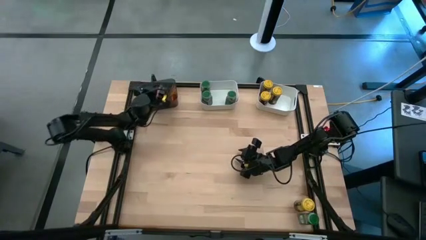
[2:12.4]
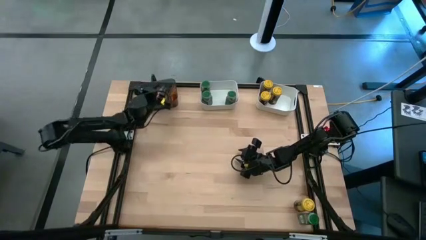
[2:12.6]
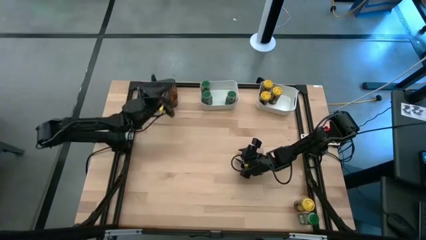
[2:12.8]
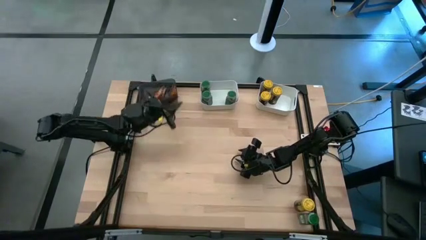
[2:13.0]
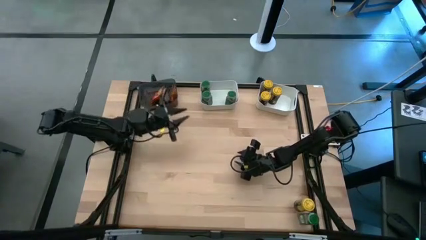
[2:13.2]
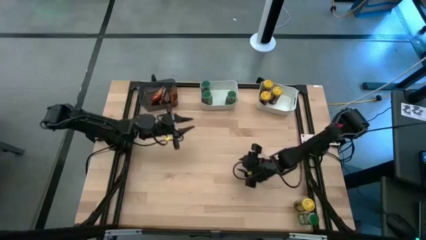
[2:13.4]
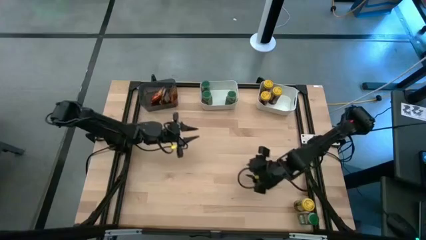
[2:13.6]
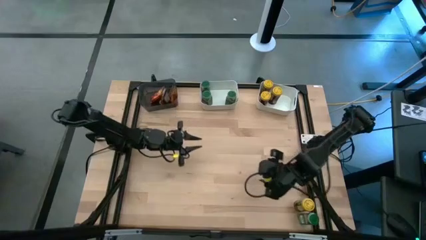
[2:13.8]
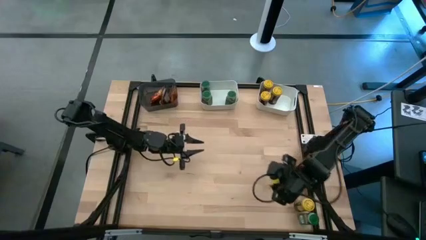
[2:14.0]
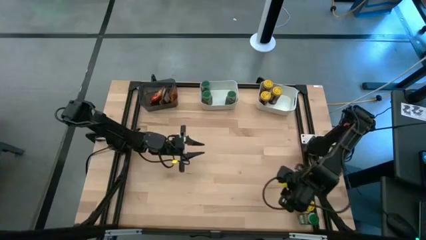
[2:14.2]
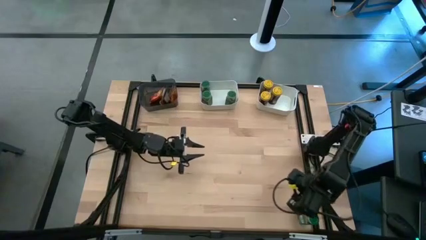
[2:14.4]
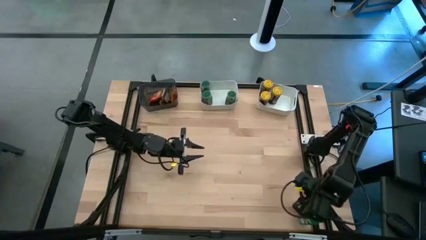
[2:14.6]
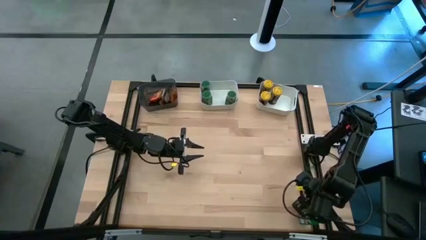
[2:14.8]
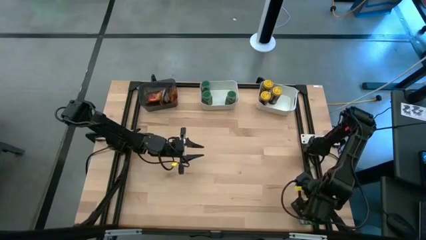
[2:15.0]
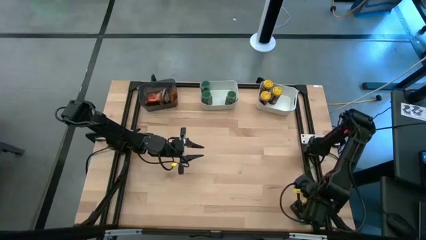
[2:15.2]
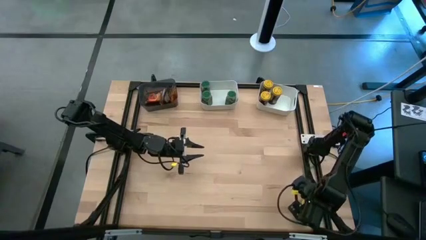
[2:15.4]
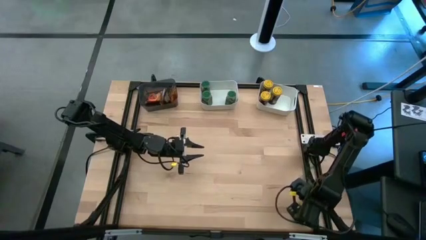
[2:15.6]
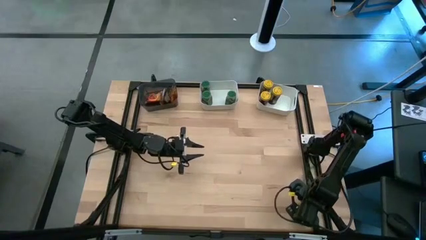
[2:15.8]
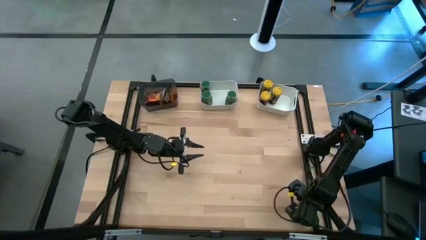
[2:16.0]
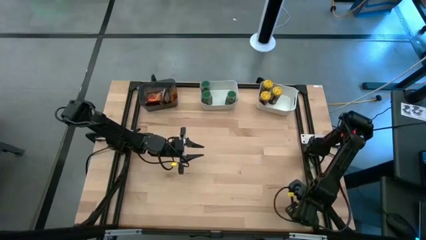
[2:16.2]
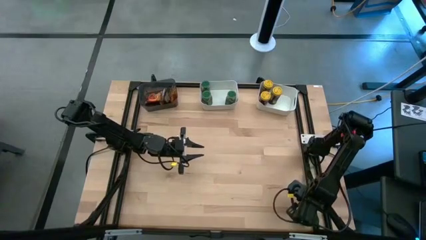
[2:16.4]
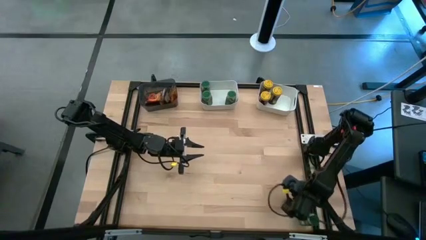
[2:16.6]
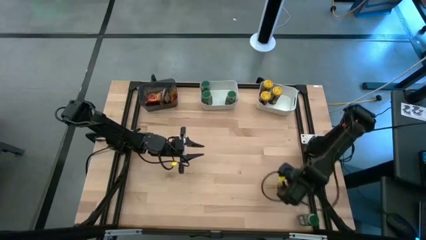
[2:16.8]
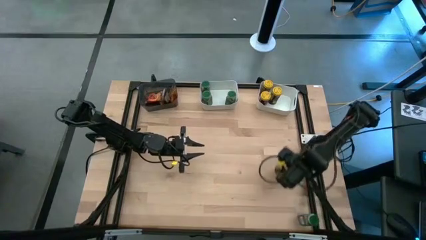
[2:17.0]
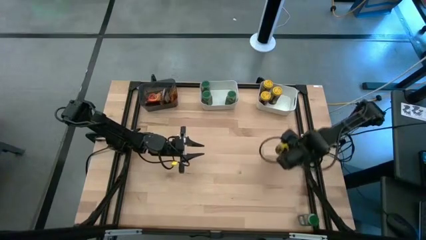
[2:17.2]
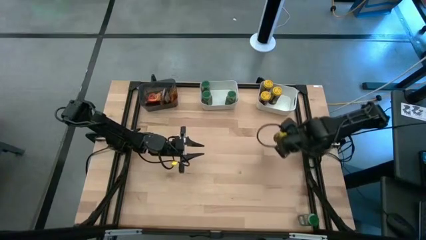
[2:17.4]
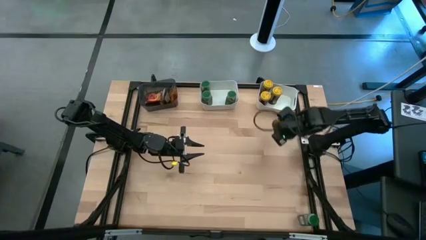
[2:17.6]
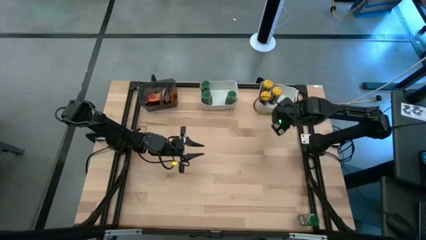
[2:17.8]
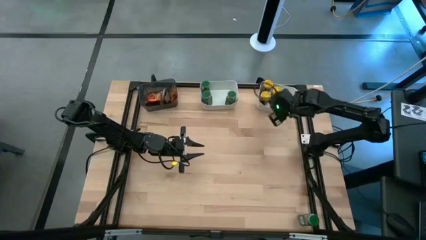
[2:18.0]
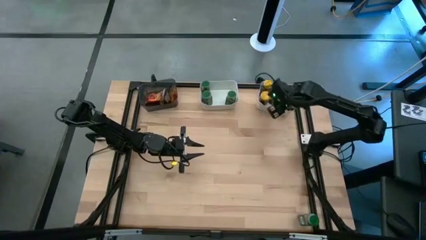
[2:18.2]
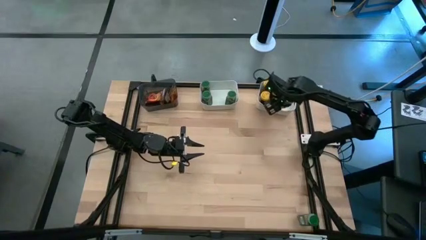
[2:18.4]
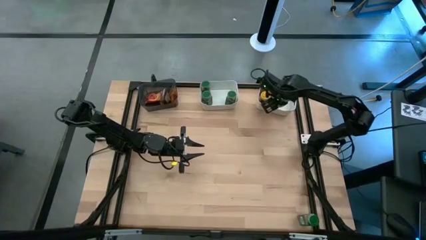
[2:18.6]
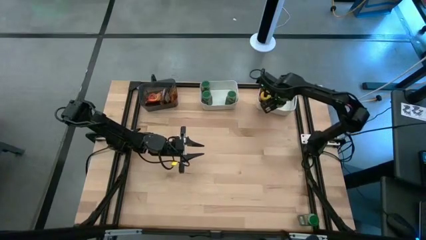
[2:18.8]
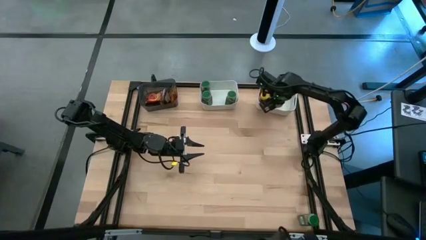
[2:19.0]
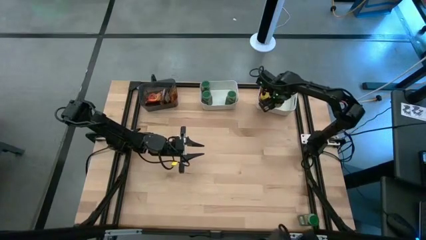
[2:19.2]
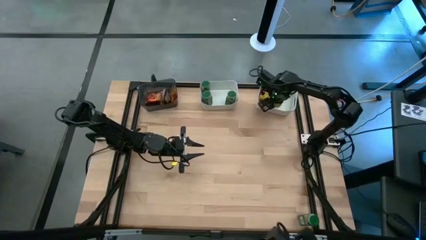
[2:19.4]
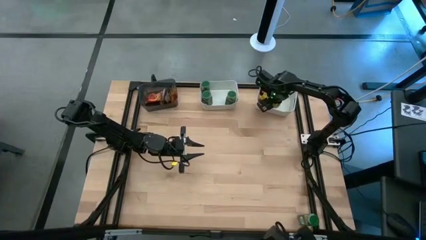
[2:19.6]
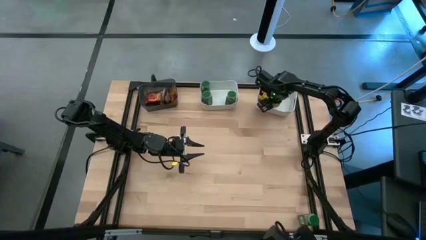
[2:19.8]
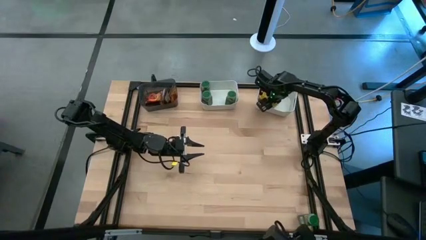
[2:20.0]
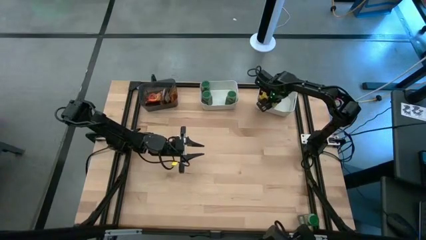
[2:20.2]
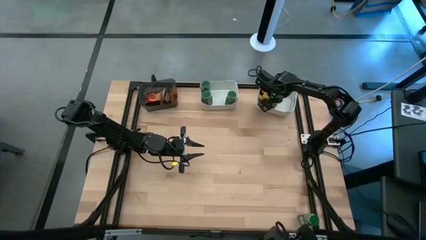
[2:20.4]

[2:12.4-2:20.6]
Task: Sort spices by type
Put the yellow seasoning bottle into the right white bin

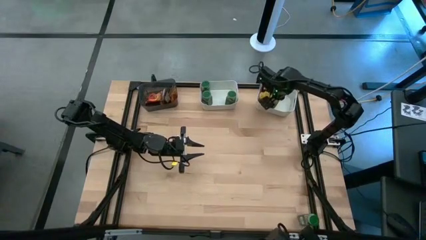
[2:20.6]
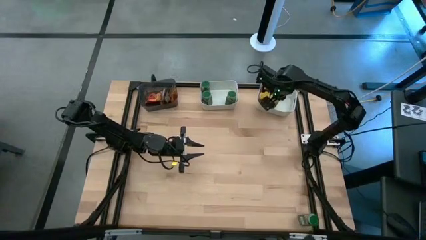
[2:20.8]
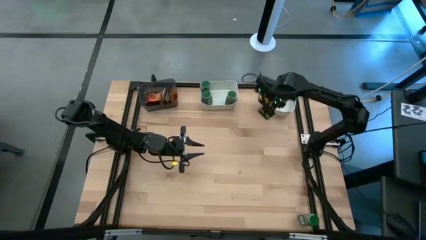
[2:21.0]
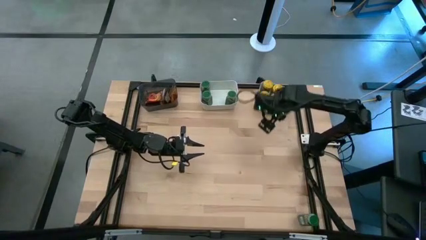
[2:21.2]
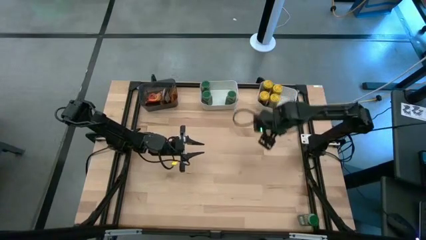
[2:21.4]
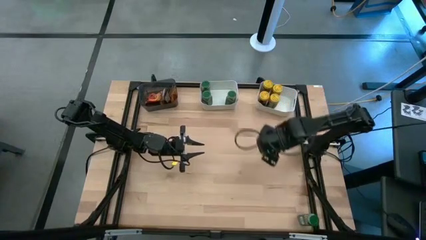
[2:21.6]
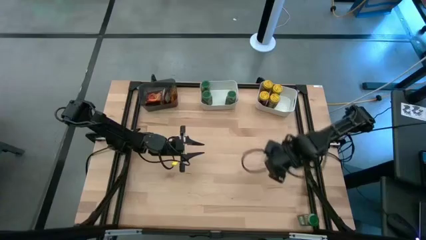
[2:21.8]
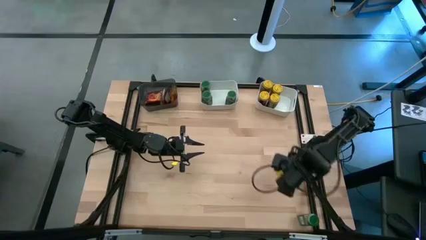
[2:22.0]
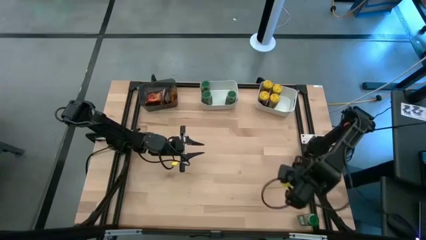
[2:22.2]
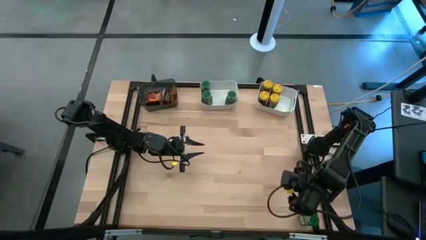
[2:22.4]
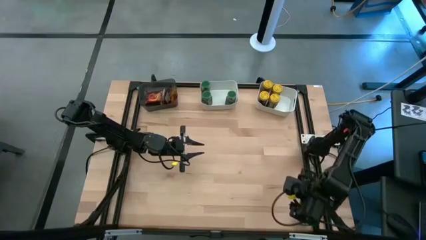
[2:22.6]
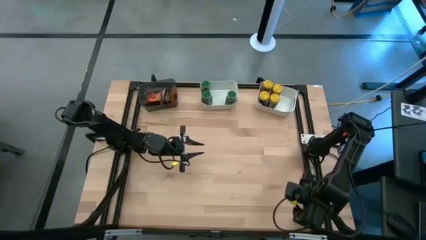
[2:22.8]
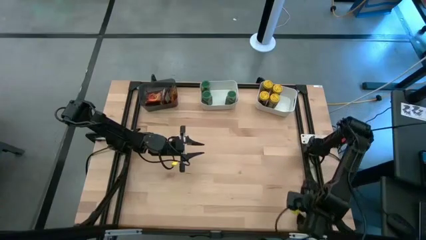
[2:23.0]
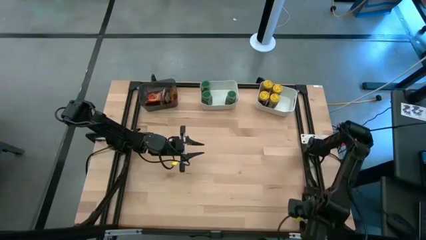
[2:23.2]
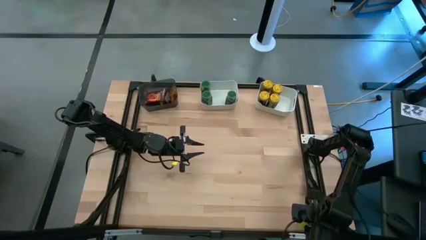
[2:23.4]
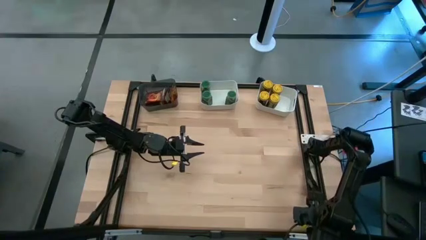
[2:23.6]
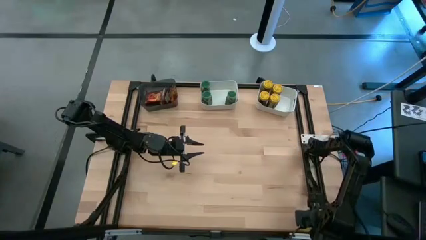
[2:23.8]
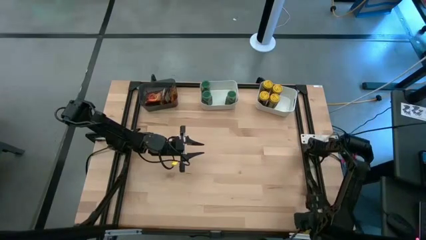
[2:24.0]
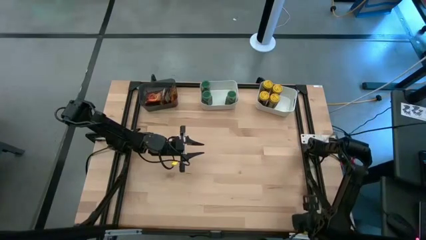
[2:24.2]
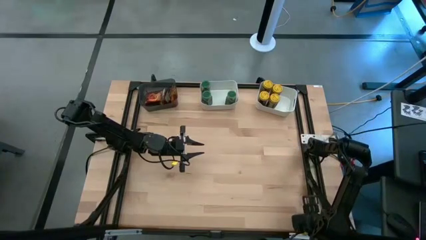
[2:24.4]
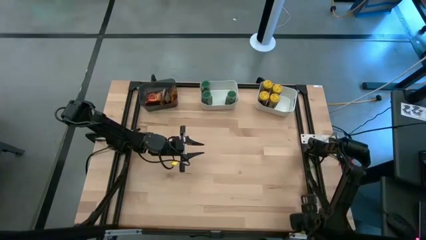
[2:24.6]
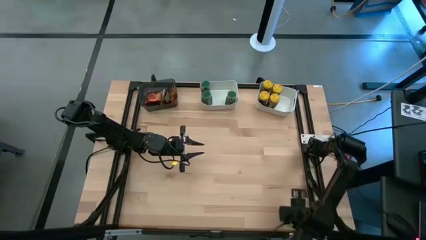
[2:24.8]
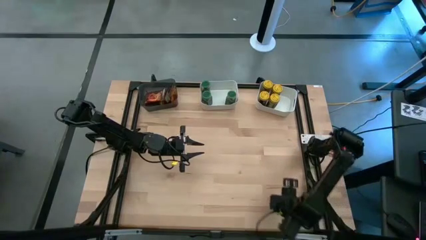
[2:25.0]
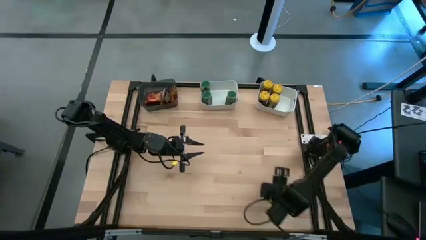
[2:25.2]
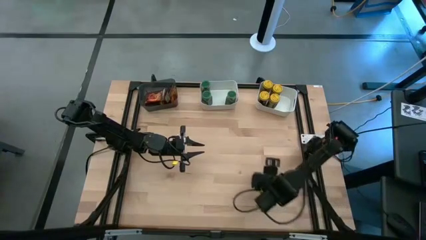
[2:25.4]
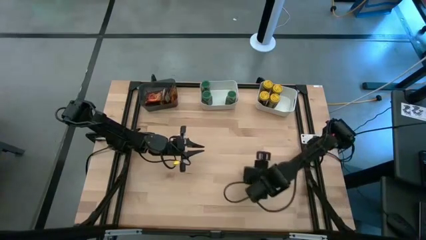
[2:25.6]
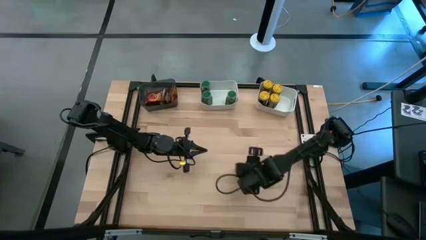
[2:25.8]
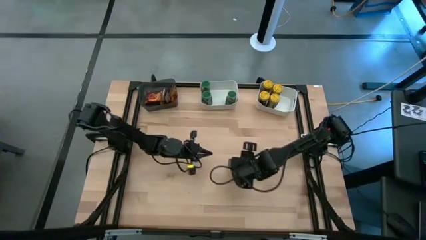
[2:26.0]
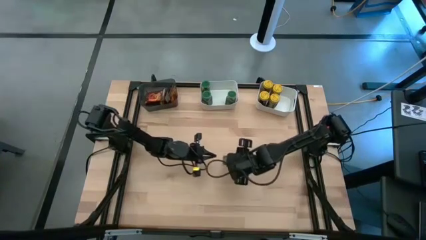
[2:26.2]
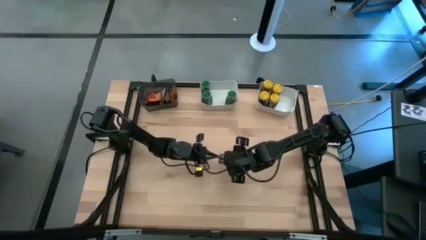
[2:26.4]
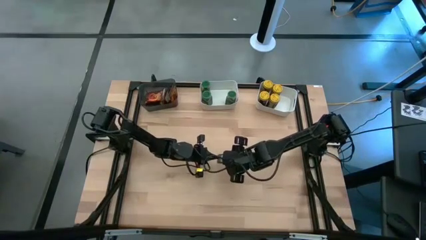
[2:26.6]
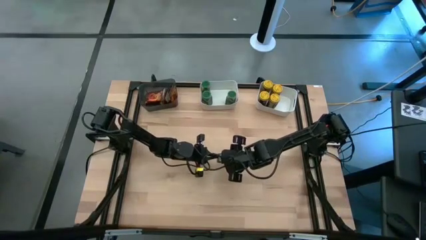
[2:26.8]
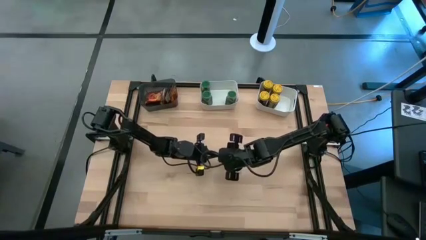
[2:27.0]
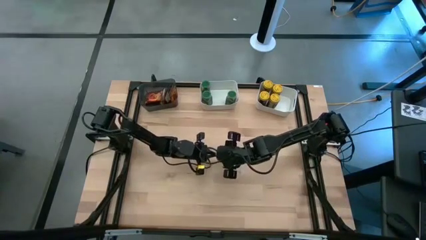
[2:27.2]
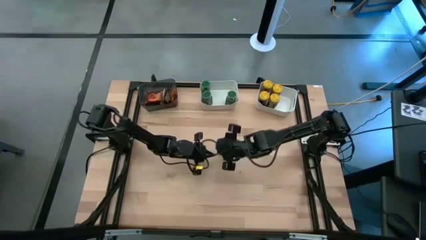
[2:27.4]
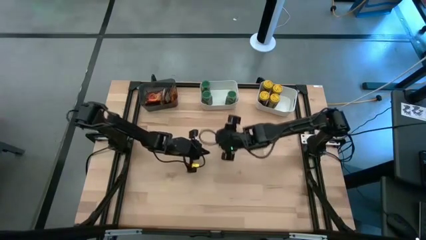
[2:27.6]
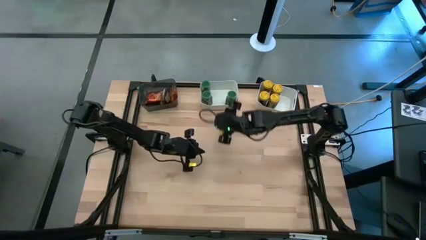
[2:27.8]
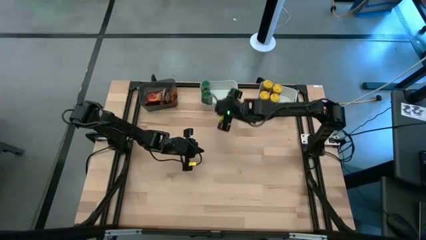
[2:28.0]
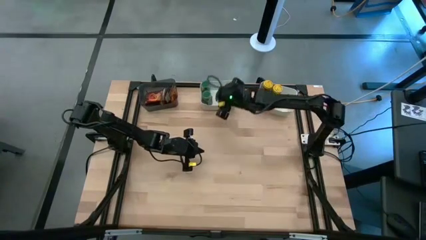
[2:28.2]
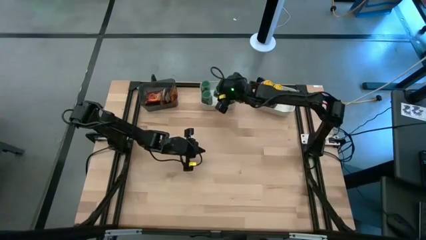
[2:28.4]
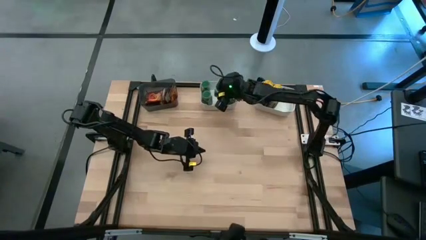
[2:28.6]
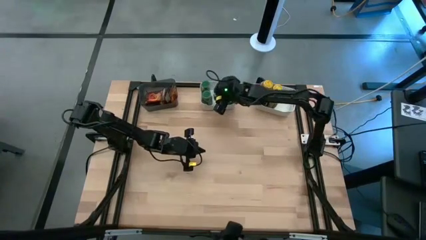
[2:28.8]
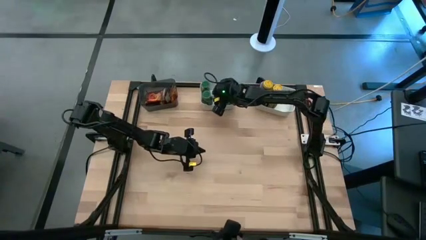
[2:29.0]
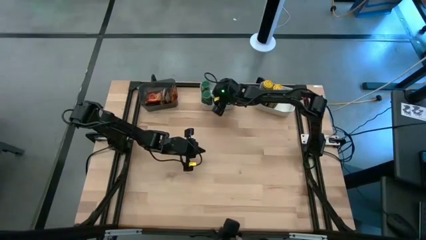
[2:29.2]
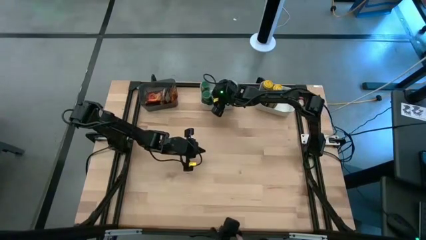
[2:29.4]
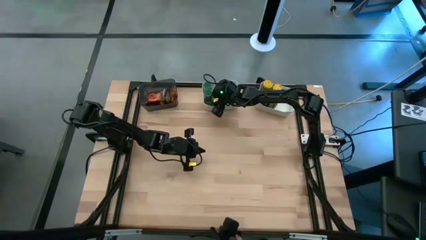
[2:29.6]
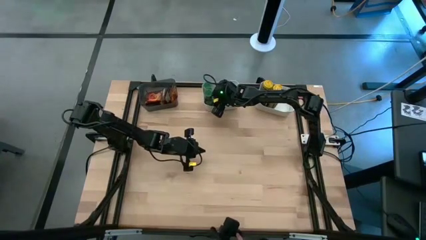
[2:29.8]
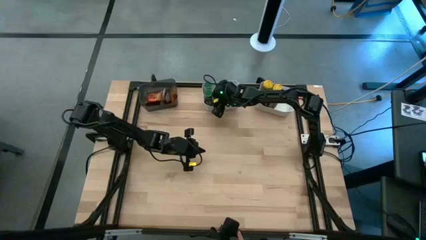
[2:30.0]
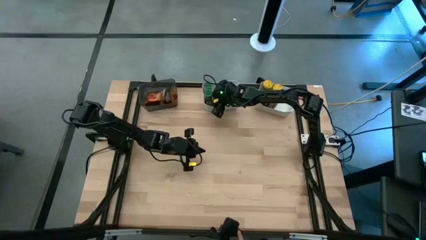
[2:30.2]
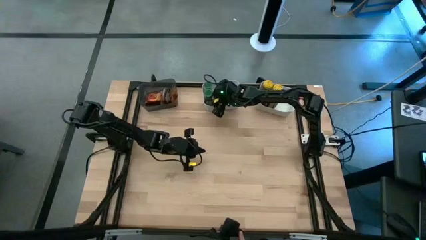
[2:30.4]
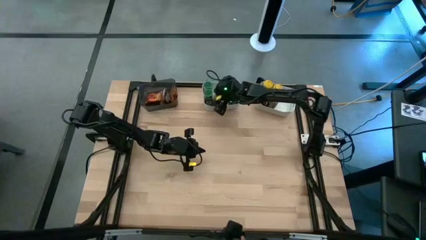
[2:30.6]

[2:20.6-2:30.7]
Put the green seasoning bottle into the left white bin
